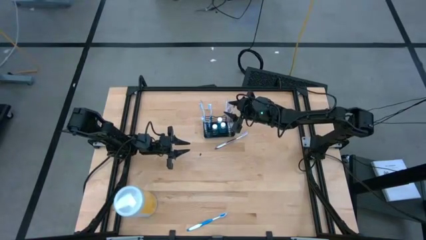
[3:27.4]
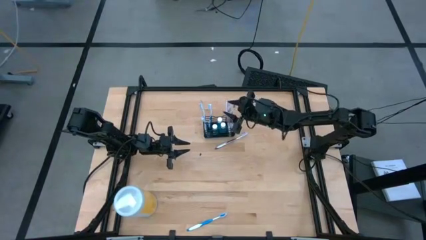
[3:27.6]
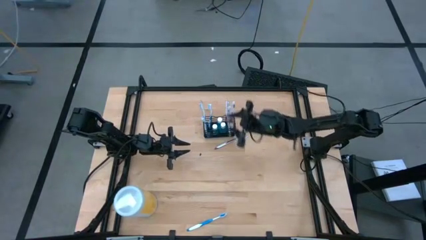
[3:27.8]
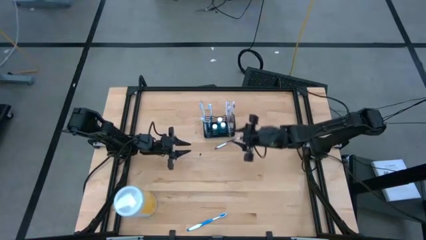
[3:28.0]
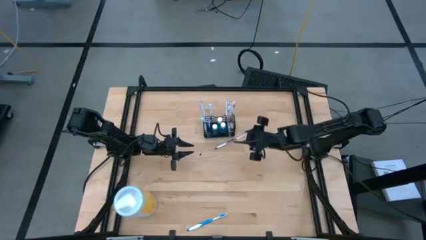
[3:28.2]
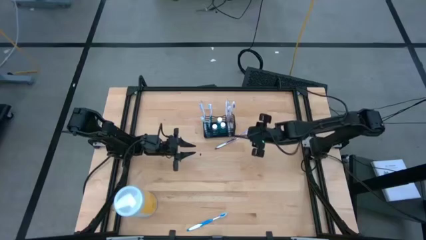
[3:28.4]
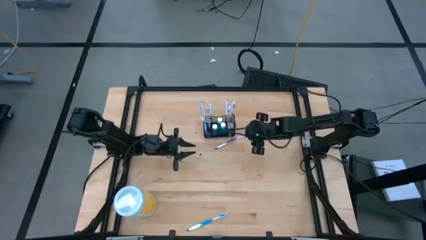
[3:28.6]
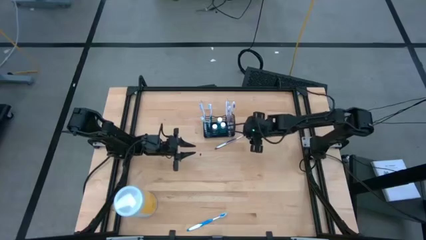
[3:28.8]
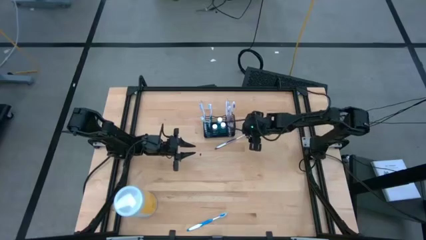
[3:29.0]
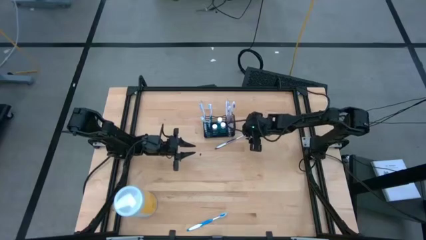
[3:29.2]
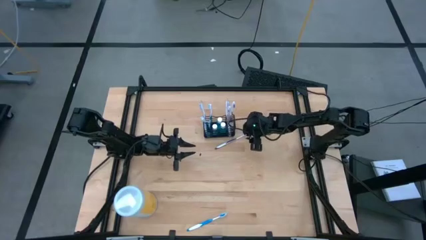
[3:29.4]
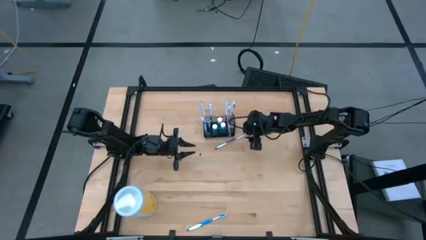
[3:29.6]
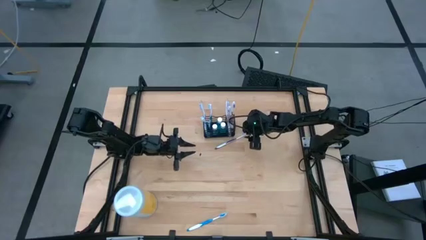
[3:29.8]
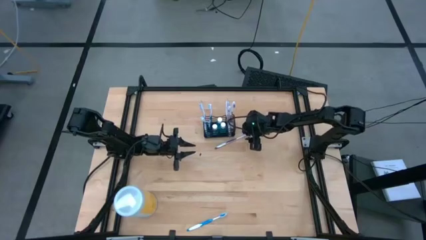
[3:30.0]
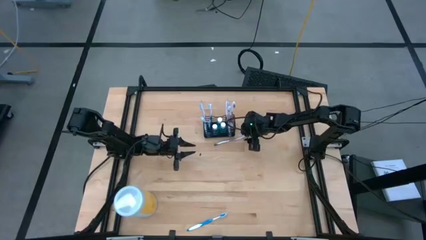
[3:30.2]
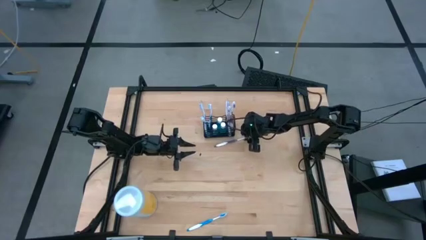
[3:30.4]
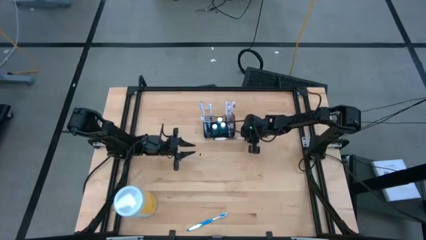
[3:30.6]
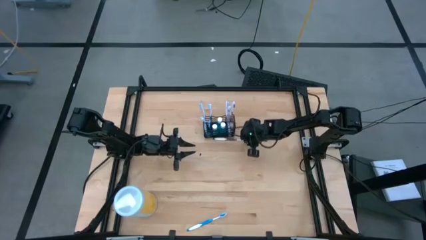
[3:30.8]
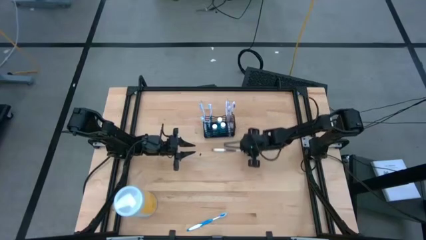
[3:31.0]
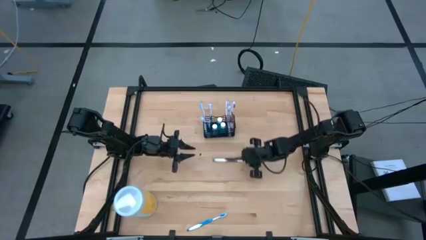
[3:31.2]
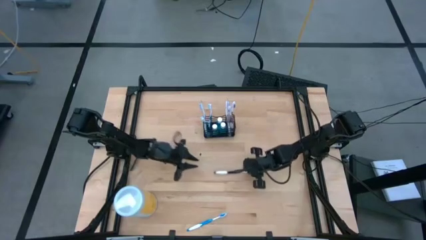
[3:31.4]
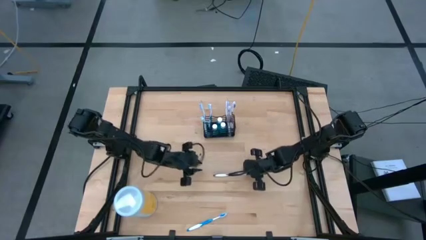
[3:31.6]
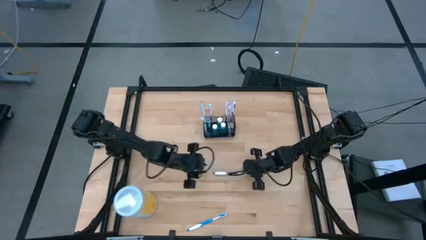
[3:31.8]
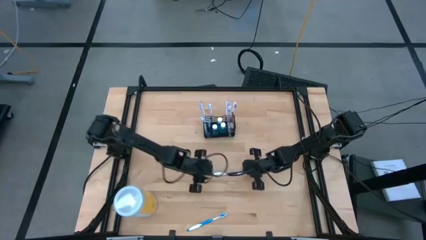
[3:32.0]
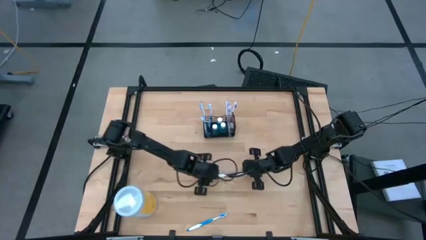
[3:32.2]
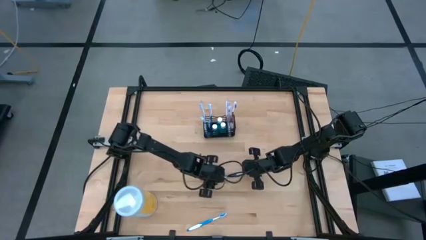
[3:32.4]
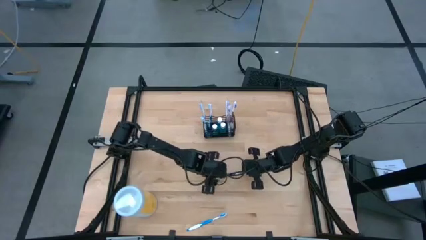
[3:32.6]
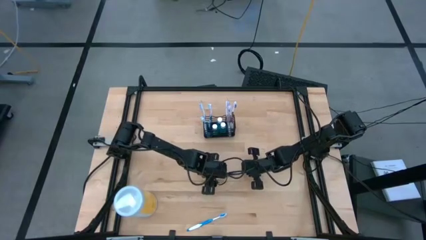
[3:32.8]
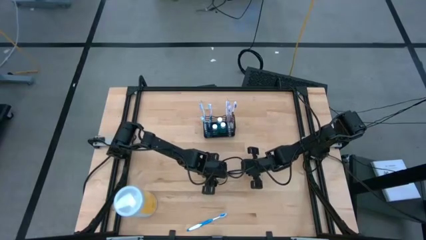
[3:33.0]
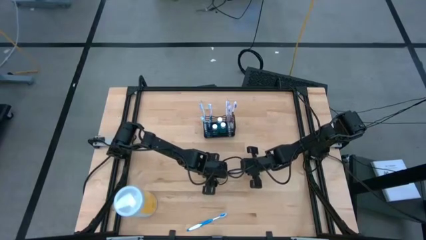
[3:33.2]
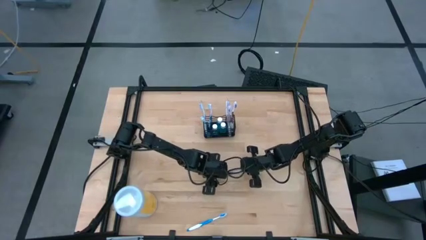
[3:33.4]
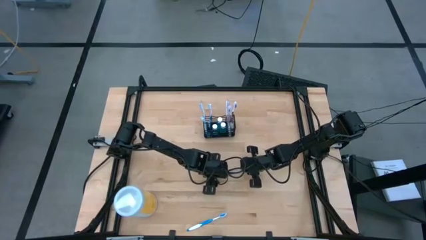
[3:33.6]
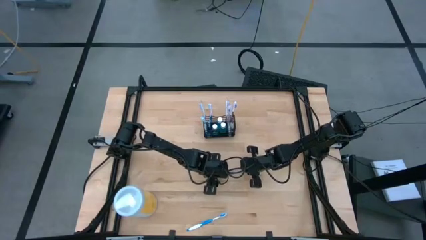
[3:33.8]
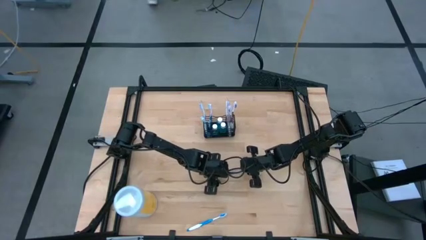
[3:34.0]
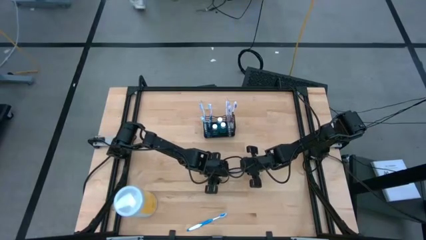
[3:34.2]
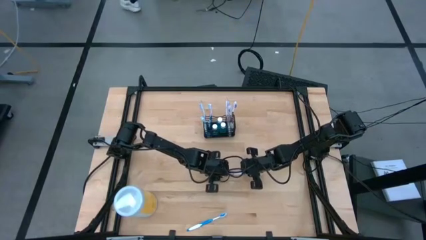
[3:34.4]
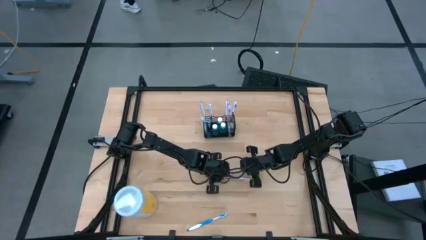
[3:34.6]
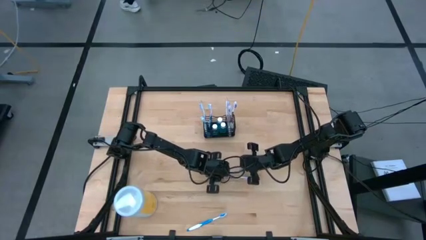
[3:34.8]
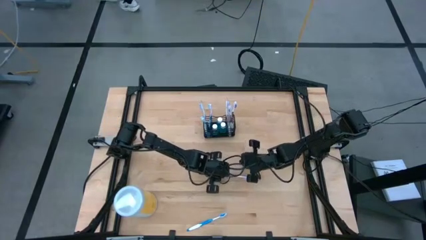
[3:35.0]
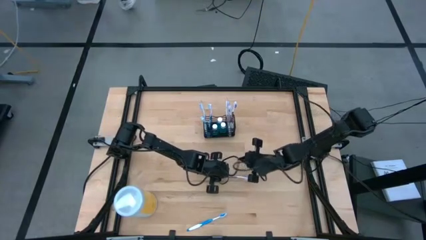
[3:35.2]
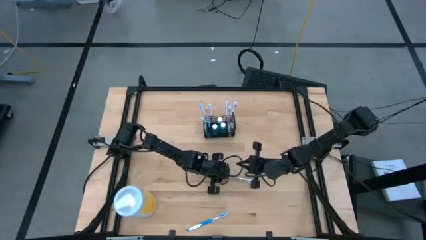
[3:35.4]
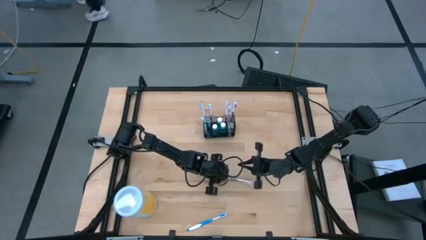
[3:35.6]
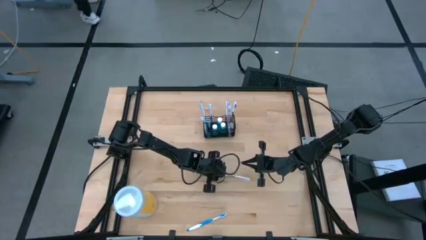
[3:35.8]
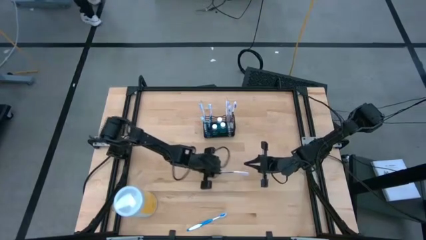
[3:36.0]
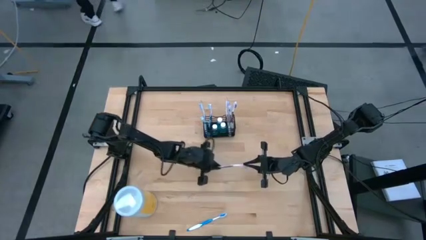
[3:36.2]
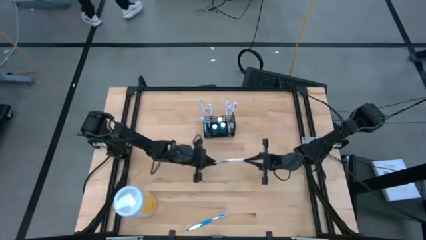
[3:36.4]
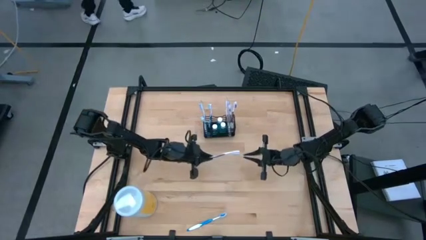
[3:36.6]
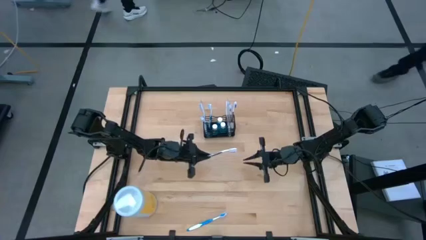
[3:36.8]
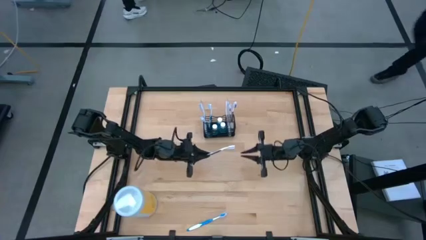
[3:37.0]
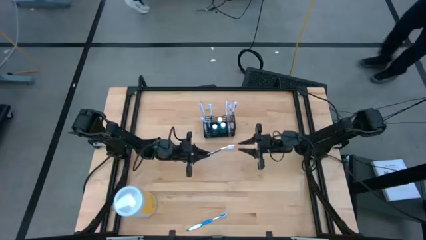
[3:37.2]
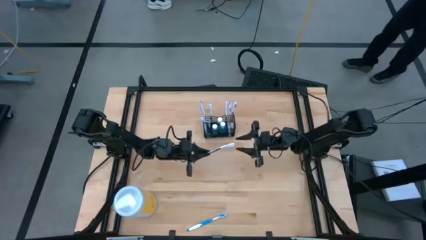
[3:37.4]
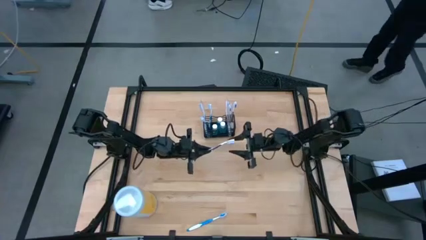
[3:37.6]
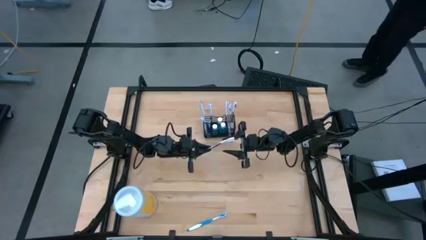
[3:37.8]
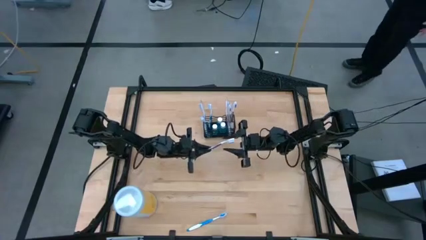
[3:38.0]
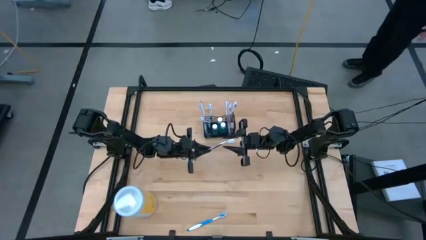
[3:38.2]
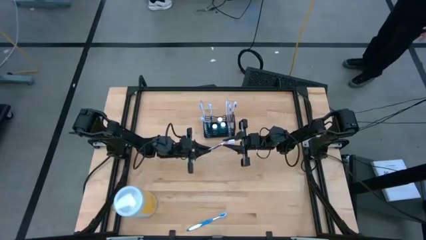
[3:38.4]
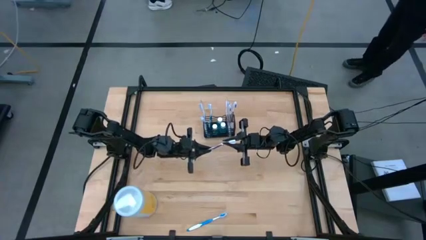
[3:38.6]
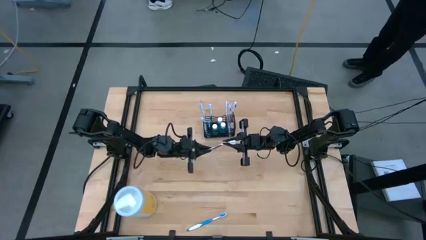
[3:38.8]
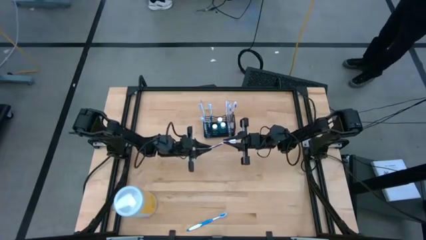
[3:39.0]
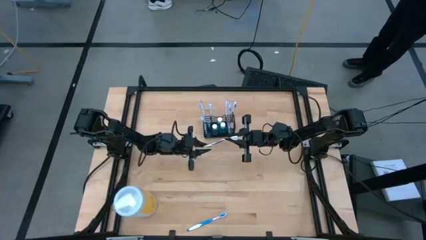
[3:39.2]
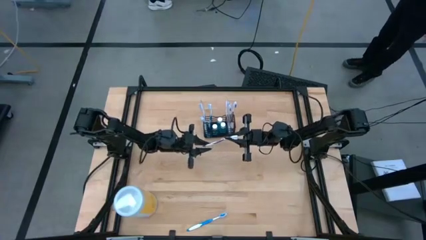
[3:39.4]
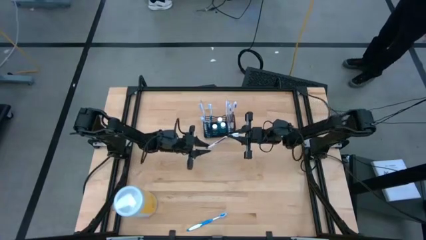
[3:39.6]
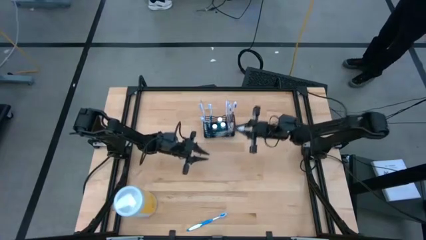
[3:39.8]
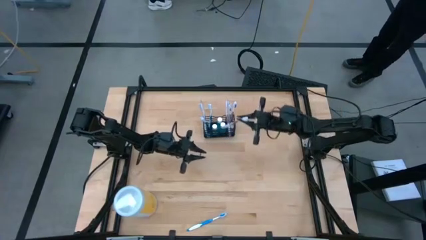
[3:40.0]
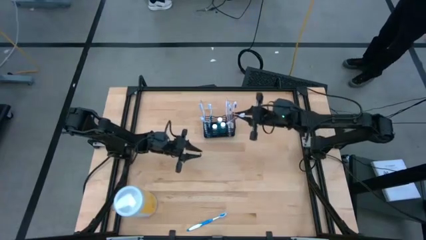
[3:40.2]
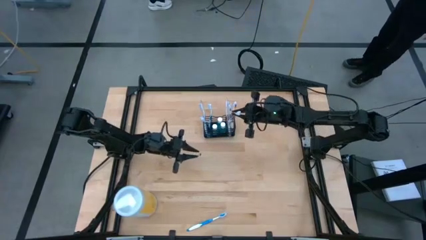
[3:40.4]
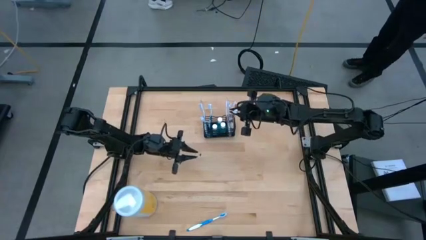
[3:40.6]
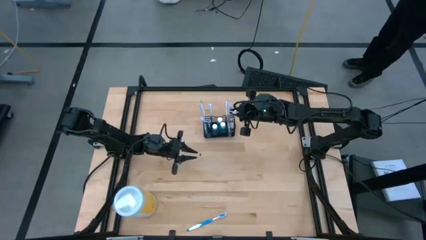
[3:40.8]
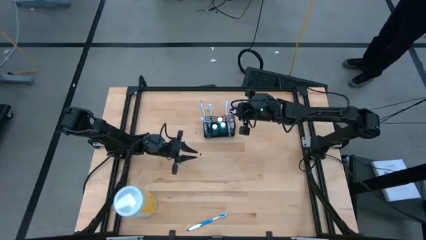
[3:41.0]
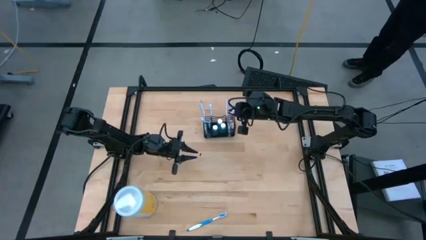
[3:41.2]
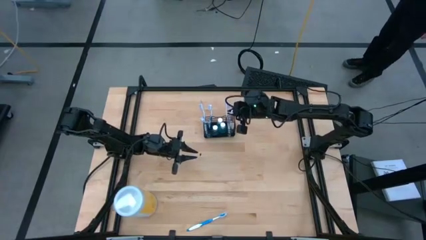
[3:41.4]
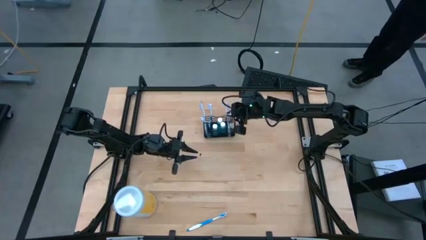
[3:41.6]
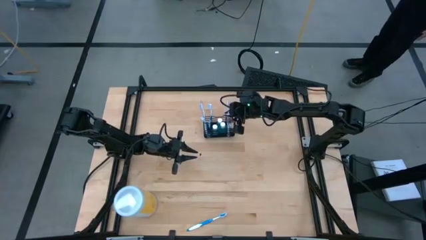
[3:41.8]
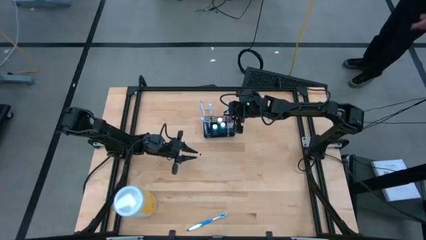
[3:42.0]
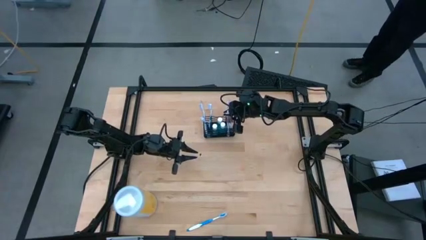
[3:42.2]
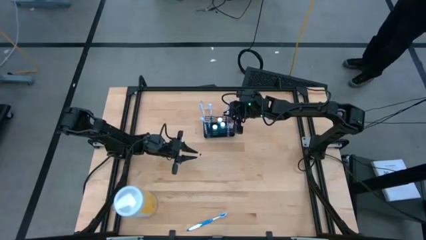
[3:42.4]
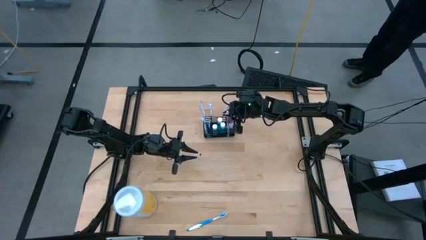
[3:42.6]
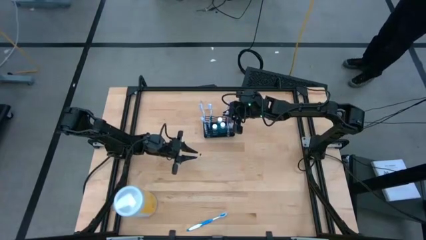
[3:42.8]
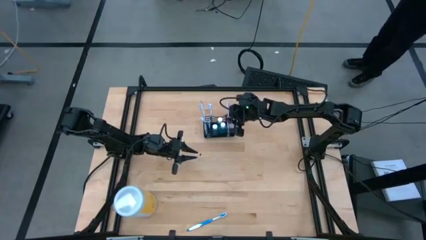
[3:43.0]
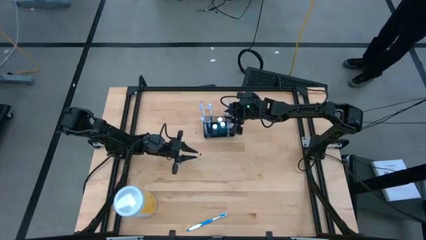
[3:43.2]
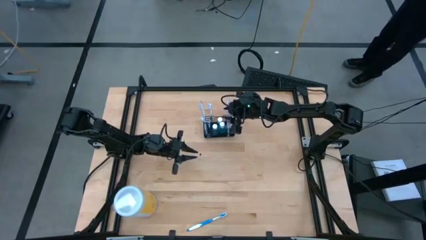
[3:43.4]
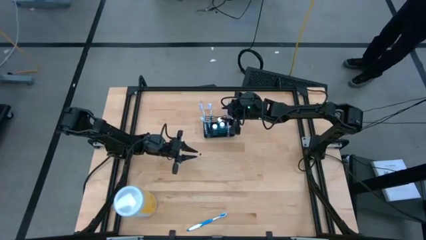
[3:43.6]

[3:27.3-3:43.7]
Task: Pick & Place toothbrushing station
Put the purple toothbrush into the black organizer
